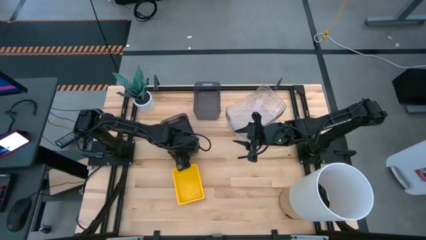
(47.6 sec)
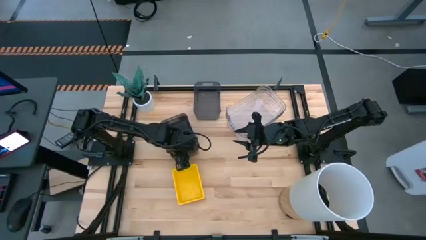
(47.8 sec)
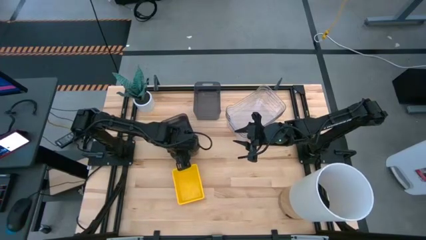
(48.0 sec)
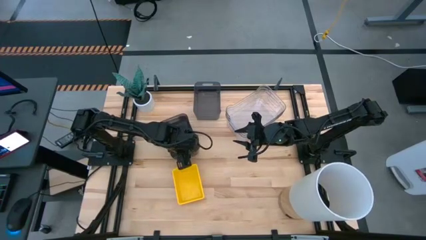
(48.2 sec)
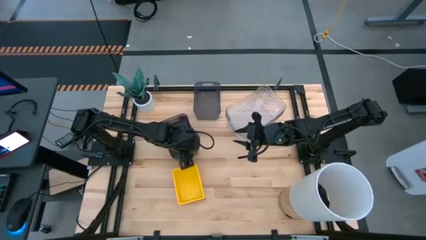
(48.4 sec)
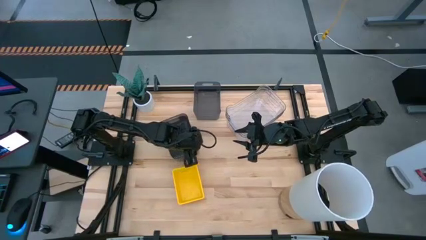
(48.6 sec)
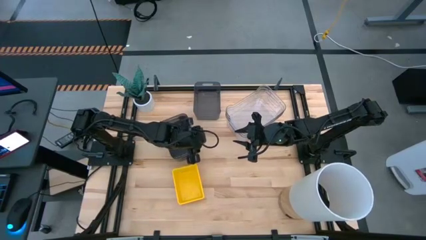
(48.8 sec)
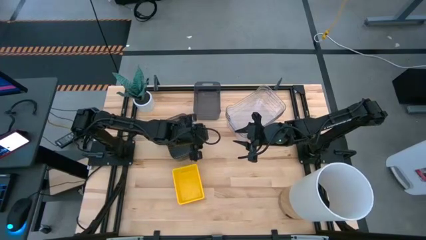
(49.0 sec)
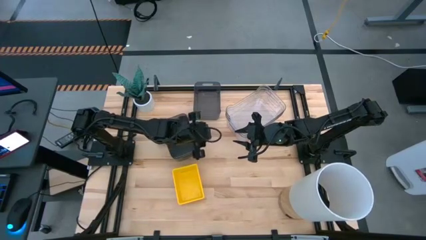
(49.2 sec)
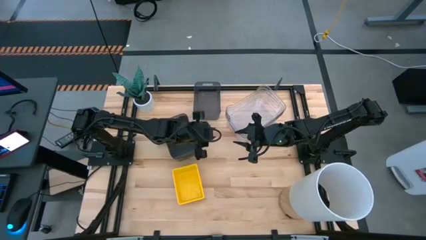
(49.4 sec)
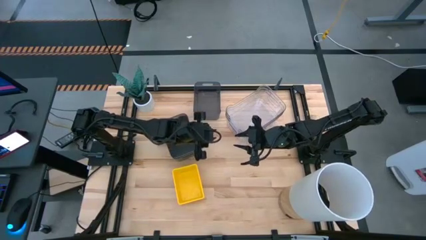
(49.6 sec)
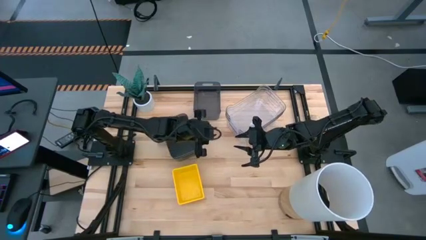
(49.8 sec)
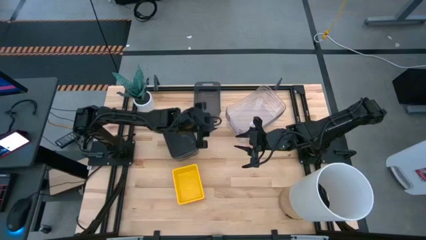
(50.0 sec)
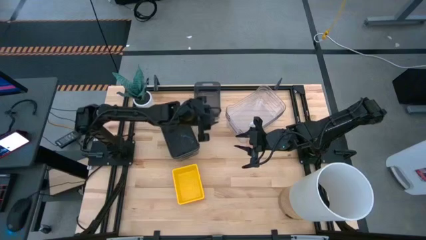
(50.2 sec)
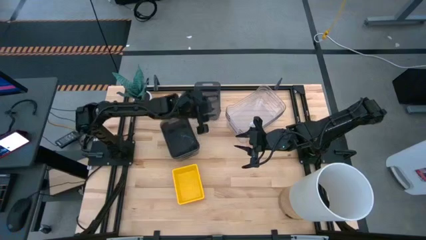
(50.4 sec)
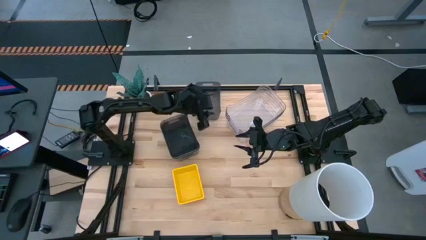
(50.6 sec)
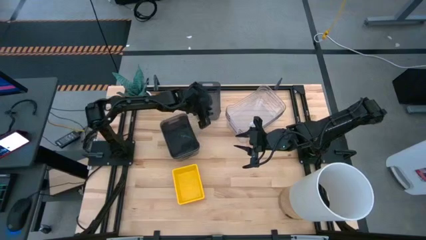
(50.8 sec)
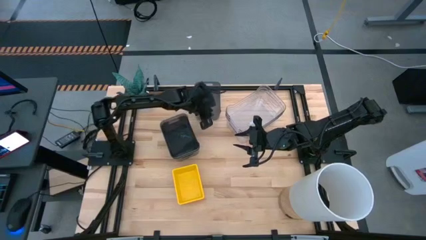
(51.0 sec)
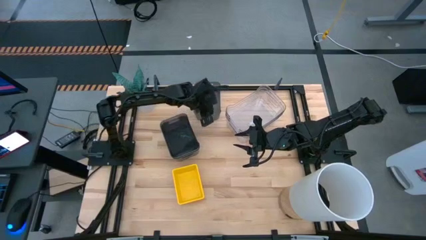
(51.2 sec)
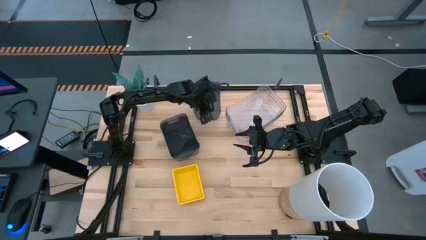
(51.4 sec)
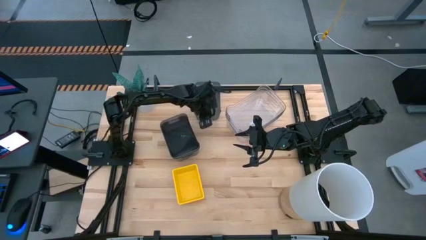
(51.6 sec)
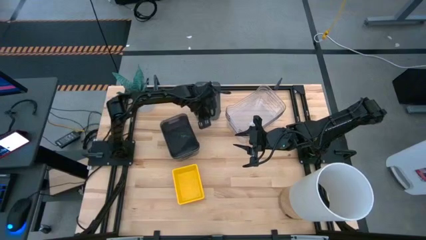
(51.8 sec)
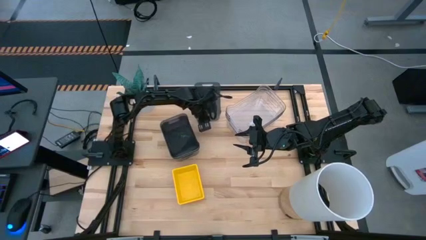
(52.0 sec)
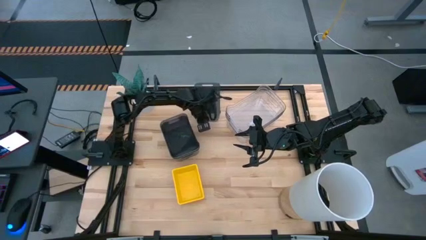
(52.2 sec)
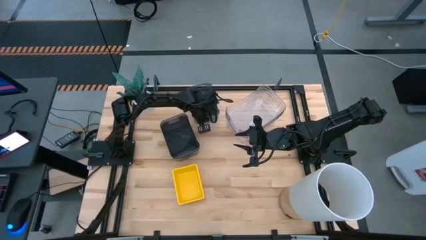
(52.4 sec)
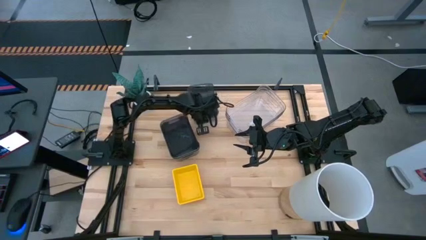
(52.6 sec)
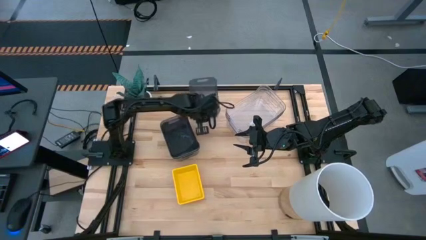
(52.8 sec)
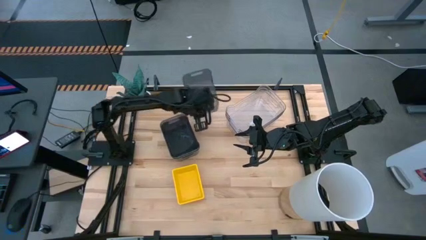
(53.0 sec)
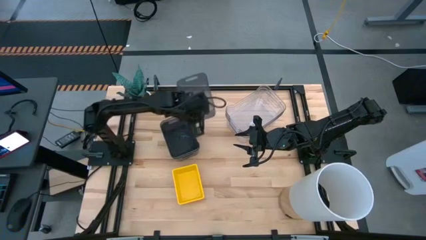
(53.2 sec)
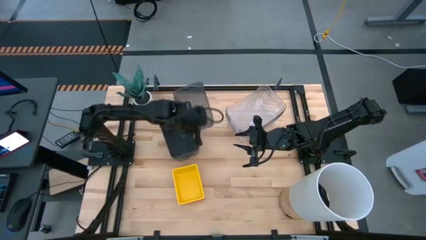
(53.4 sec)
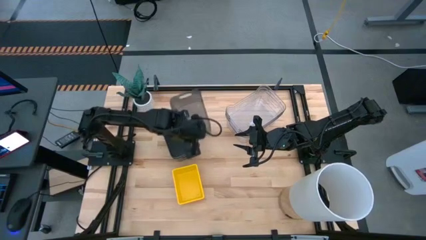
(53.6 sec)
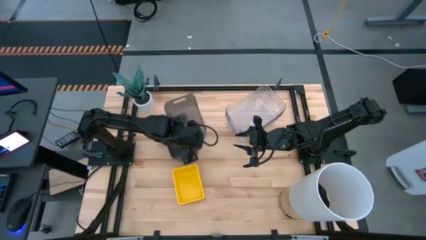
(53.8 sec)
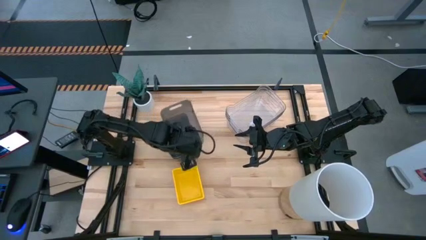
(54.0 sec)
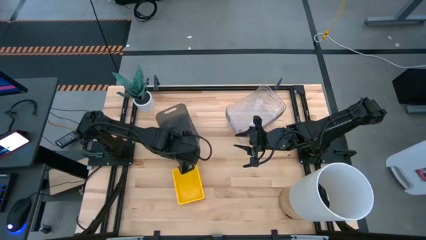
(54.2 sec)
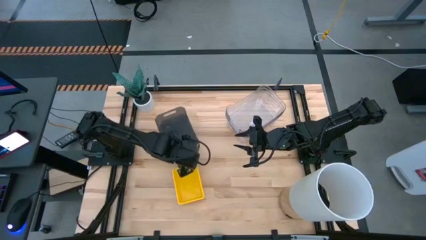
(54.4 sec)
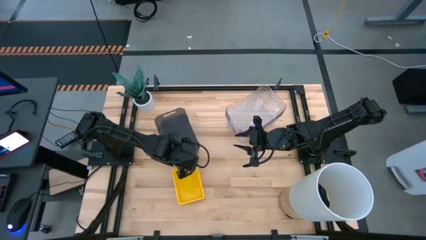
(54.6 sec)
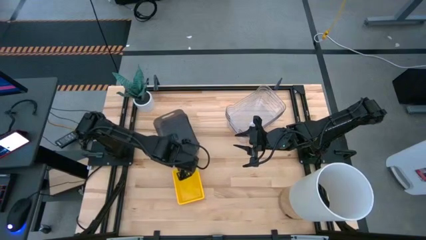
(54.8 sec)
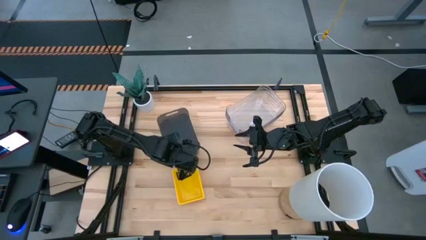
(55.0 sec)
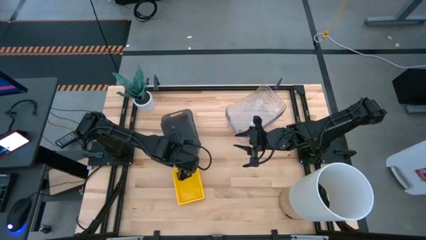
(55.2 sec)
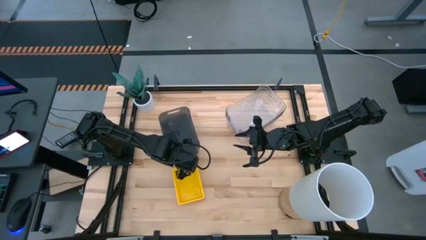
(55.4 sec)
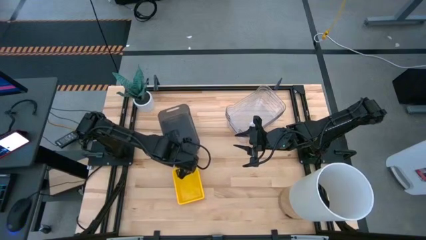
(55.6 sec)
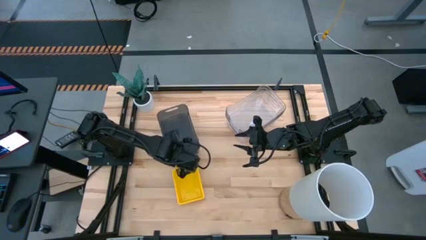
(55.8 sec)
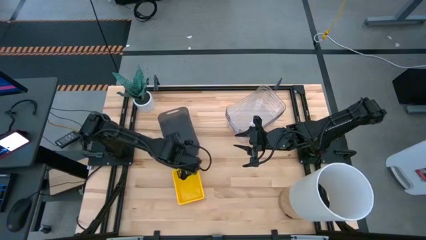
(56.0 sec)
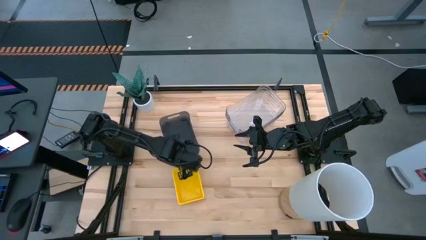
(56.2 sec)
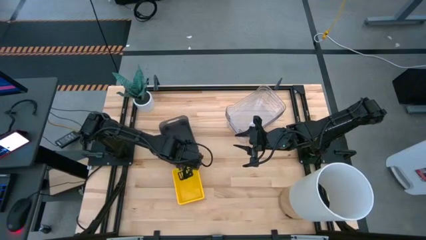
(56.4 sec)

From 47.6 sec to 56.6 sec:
Stack the top black bin on top of the bottom black bins

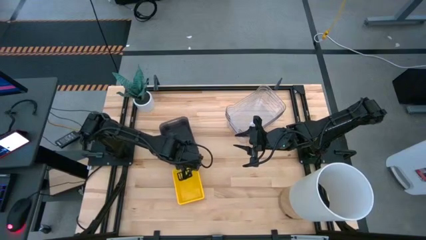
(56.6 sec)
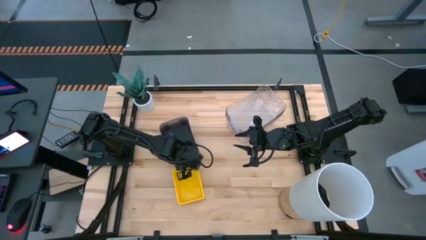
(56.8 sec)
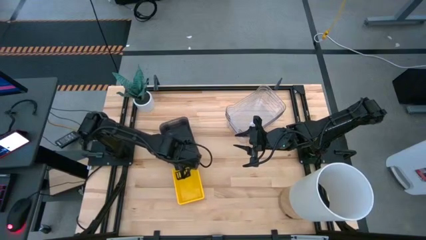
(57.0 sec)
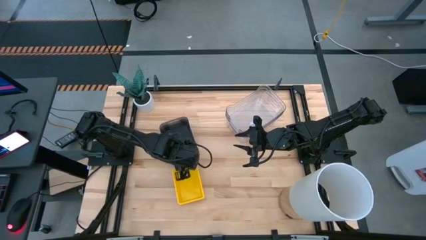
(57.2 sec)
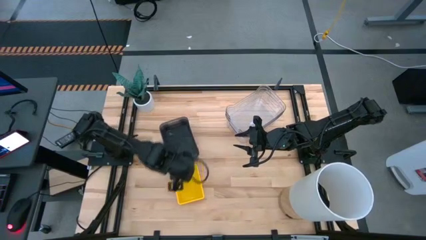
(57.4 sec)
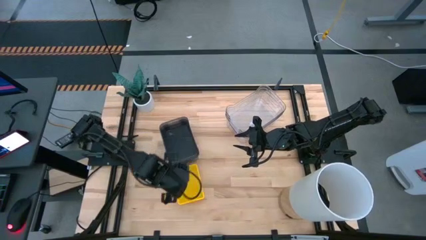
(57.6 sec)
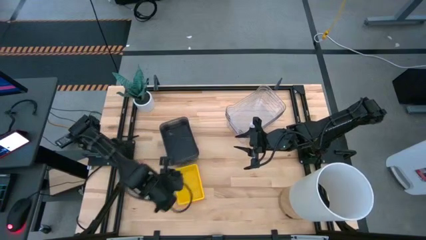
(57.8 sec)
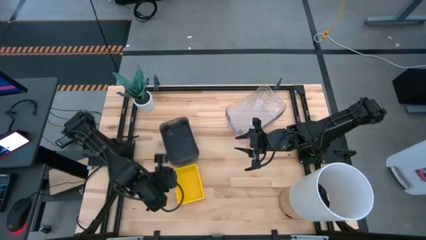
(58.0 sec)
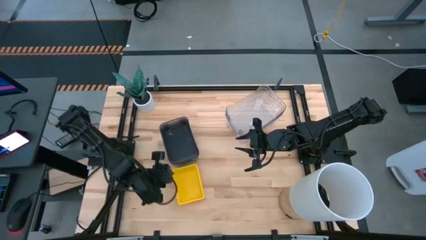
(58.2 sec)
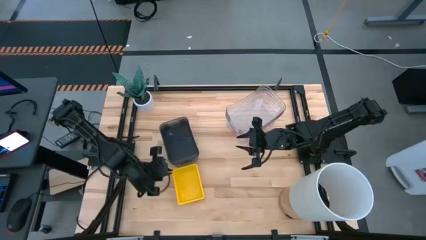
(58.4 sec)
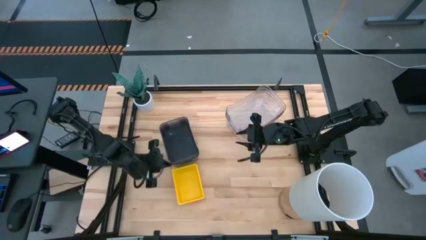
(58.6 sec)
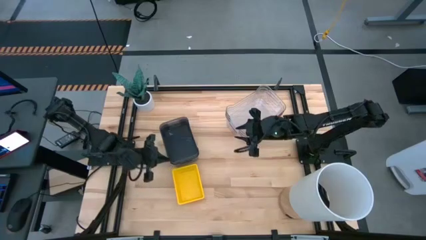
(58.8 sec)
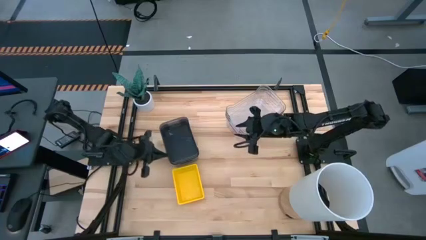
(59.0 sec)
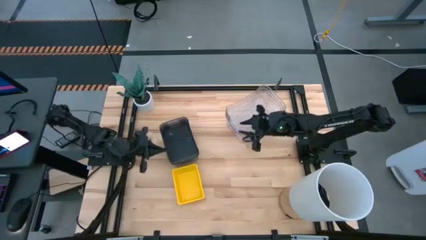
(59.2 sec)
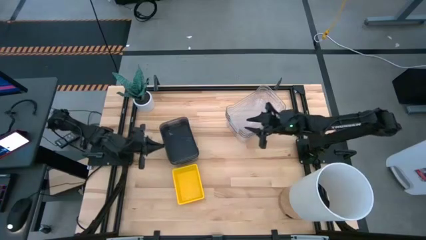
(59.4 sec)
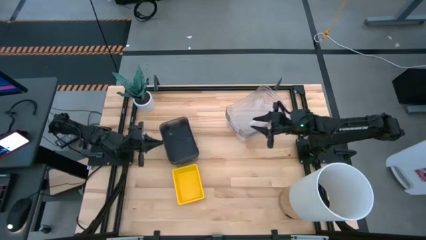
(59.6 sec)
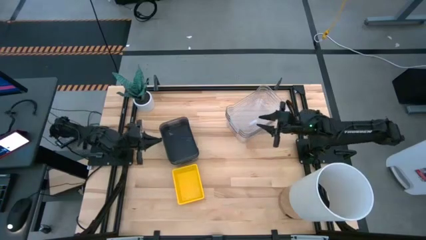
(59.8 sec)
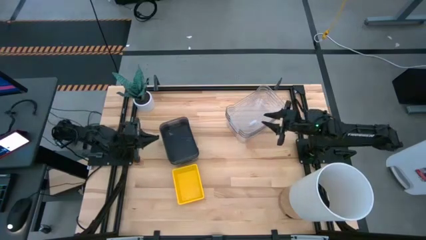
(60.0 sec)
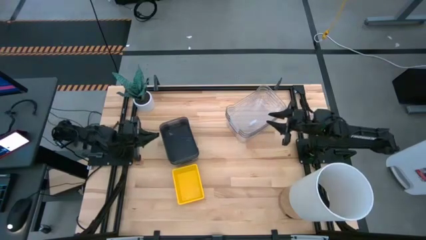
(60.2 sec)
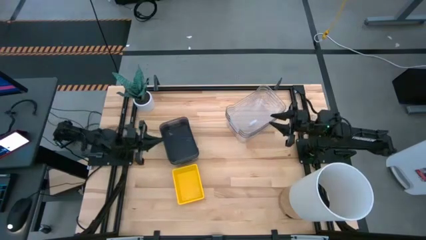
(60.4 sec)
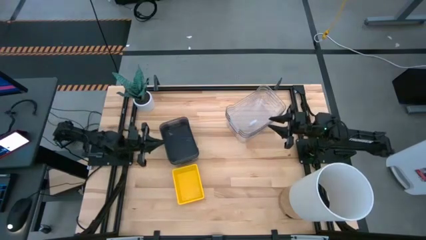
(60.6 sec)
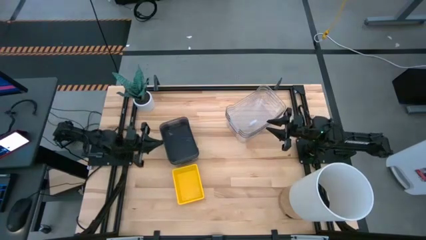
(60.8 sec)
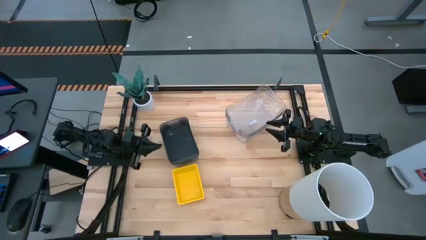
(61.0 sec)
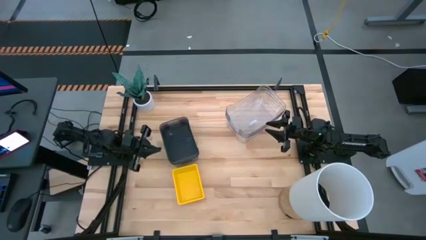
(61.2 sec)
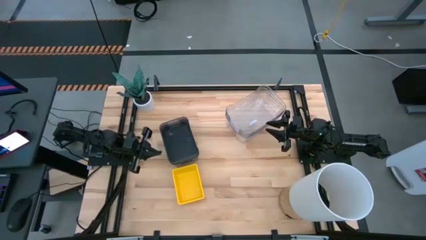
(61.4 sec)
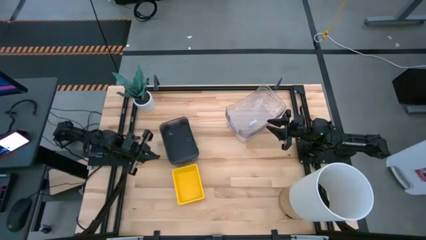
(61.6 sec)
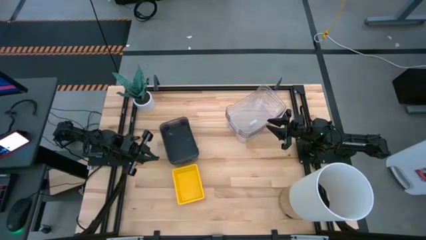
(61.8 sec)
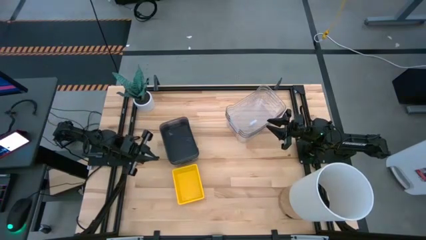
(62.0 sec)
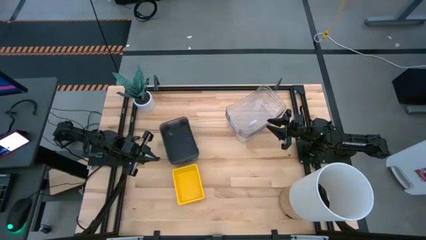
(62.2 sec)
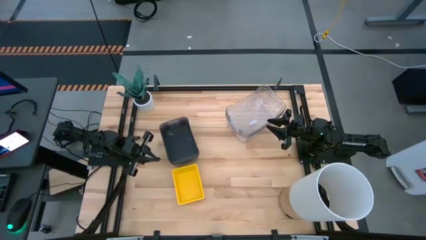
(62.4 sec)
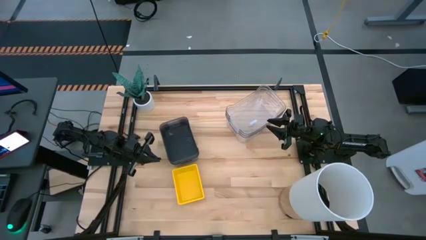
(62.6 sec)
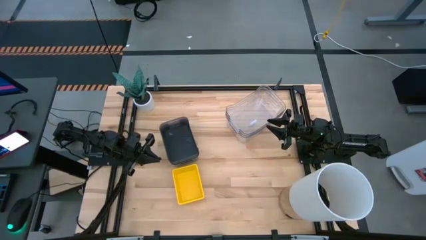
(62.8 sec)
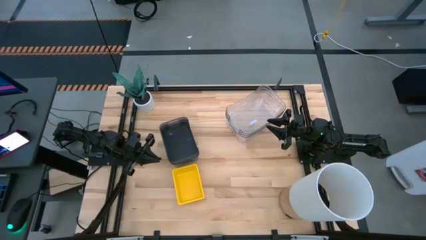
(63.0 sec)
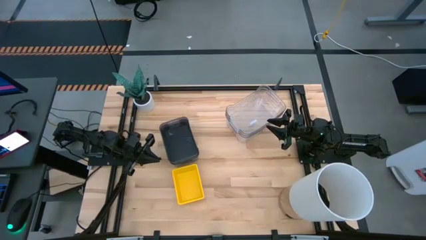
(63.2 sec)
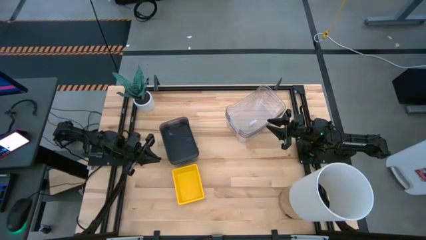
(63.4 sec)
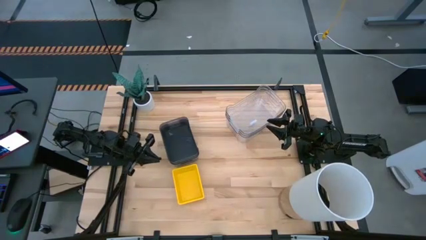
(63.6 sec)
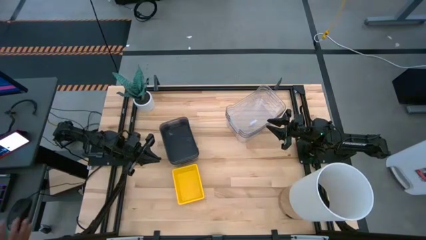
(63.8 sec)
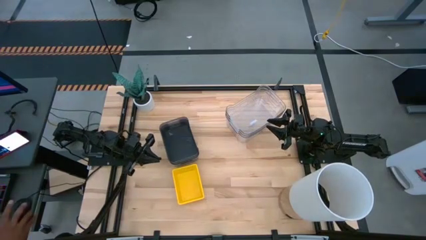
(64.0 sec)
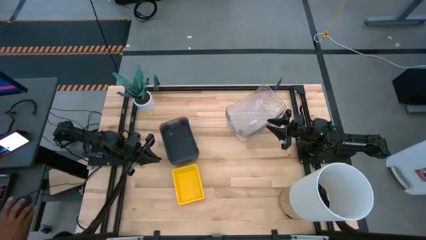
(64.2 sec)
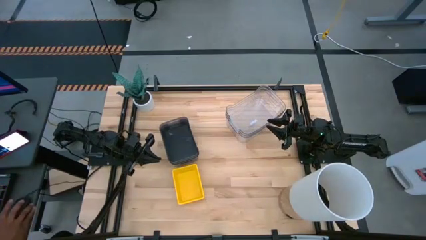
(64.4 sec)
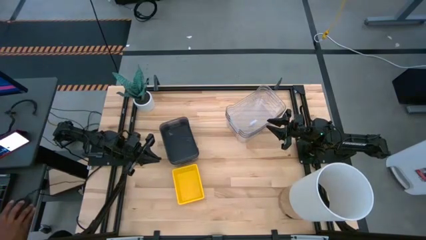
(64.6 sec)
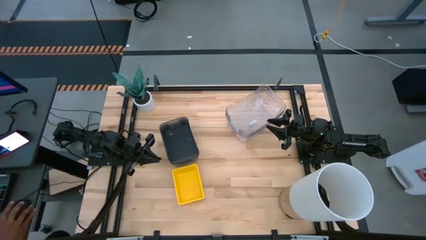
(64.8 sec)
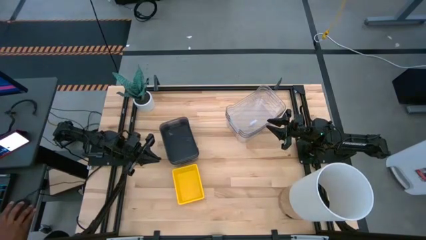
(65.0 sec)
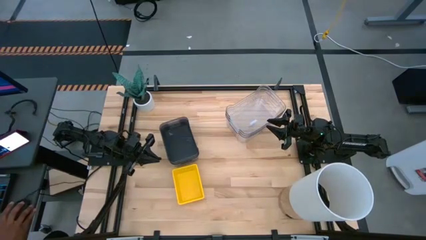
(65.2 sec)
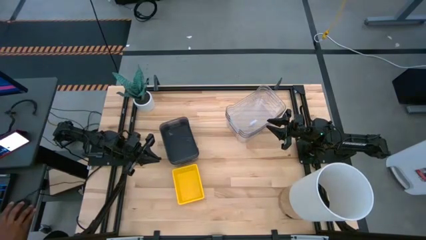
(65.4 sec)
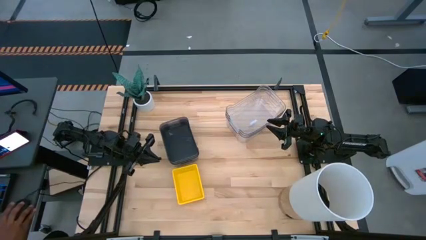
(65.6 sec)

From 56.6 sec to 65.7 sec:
Return to Home Position
